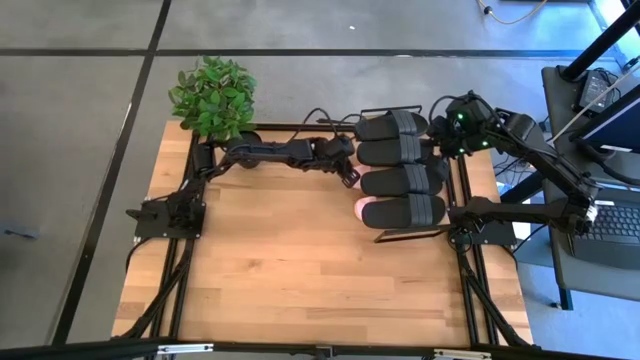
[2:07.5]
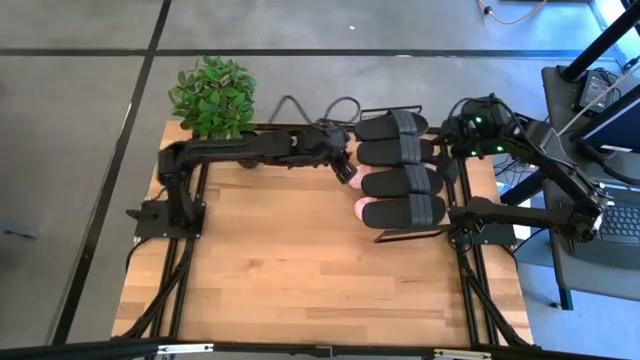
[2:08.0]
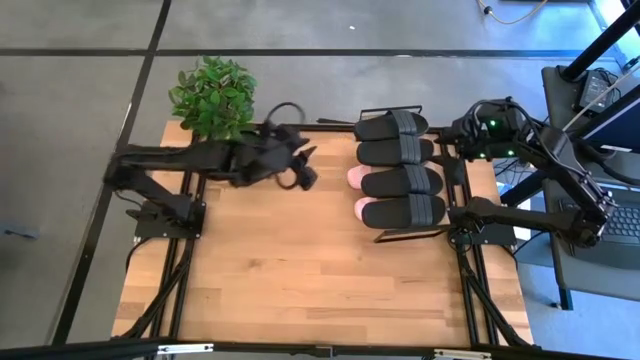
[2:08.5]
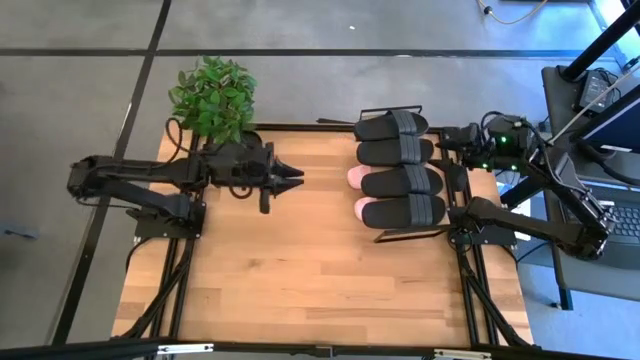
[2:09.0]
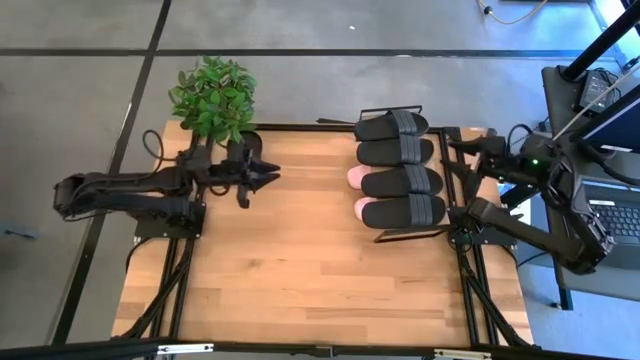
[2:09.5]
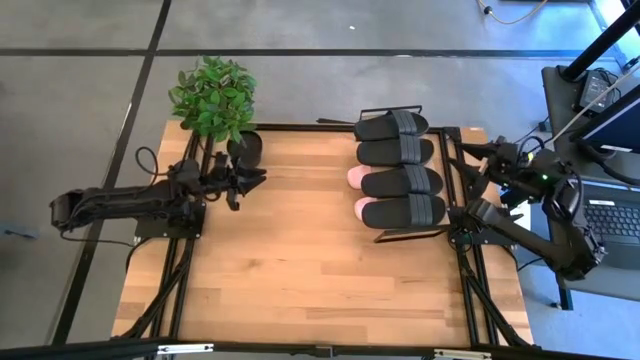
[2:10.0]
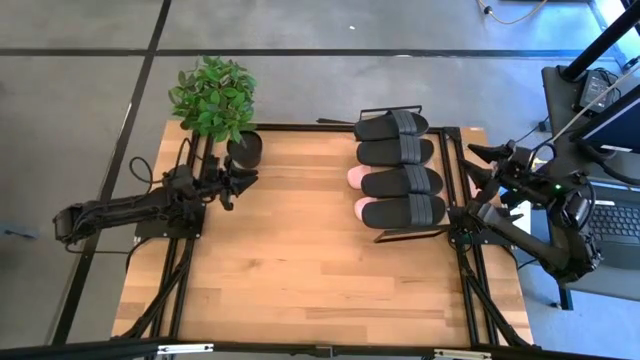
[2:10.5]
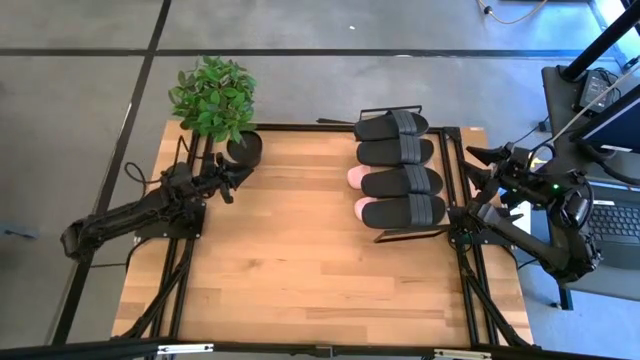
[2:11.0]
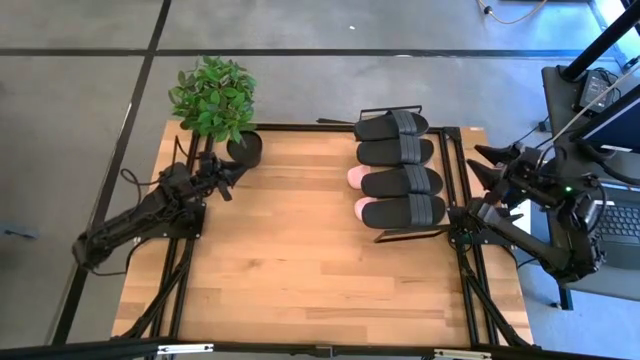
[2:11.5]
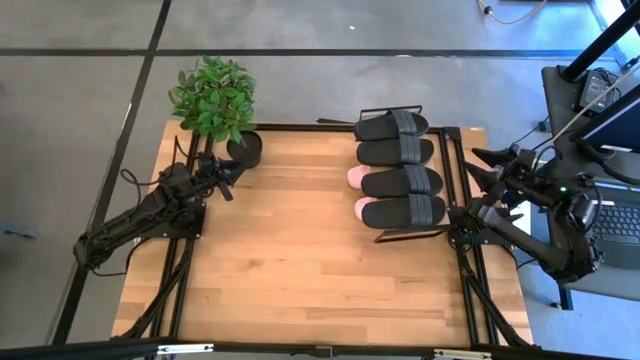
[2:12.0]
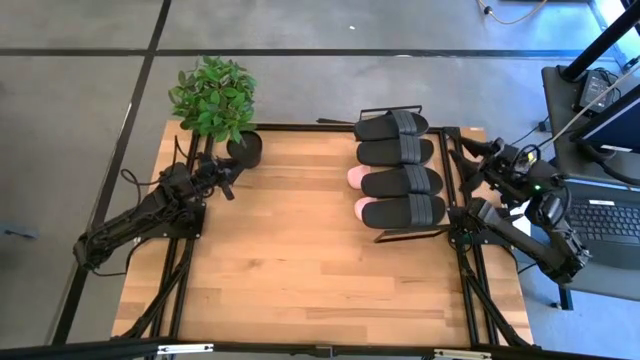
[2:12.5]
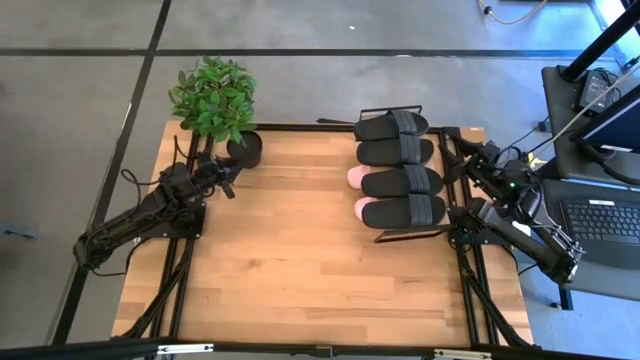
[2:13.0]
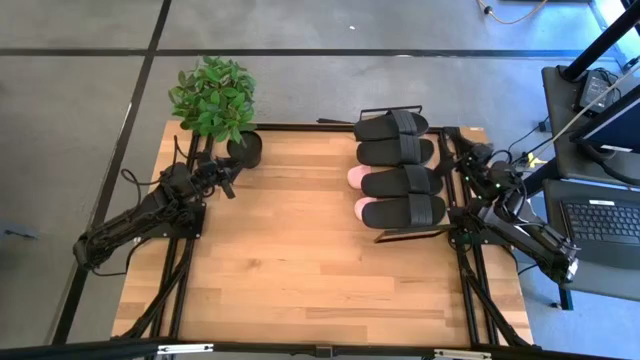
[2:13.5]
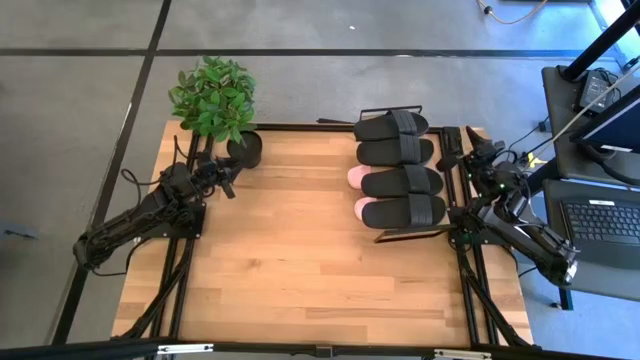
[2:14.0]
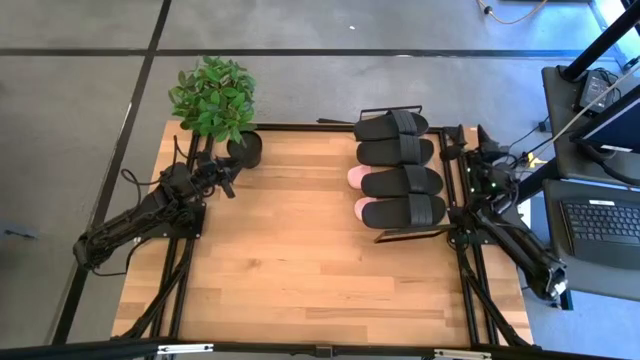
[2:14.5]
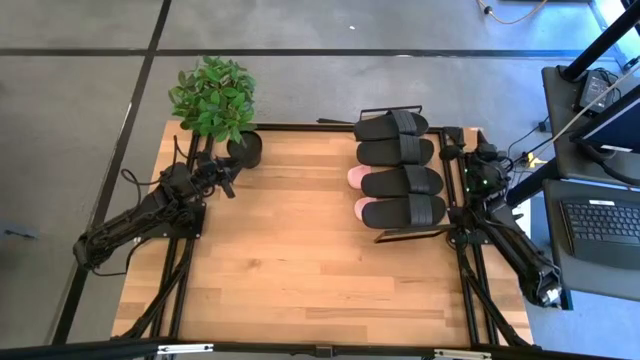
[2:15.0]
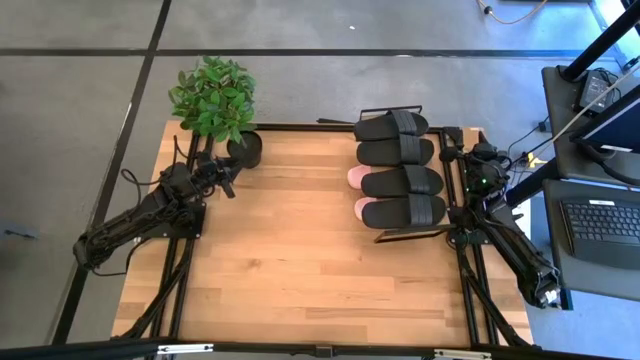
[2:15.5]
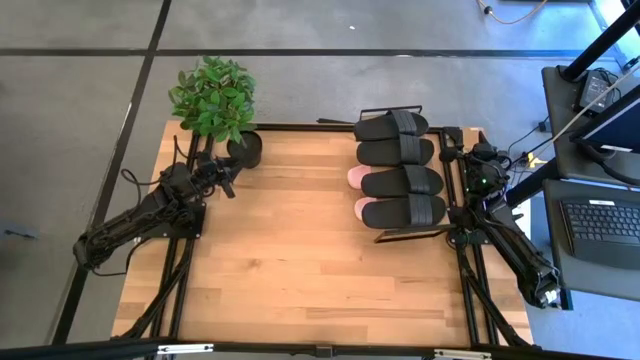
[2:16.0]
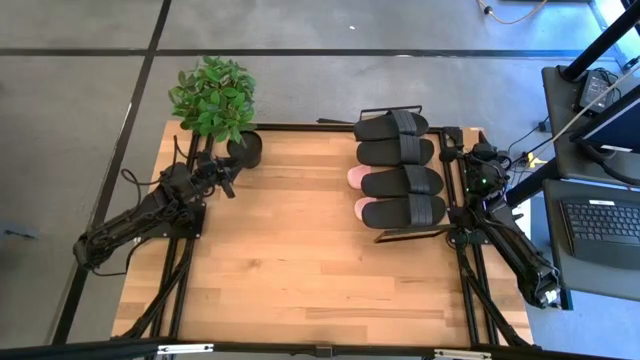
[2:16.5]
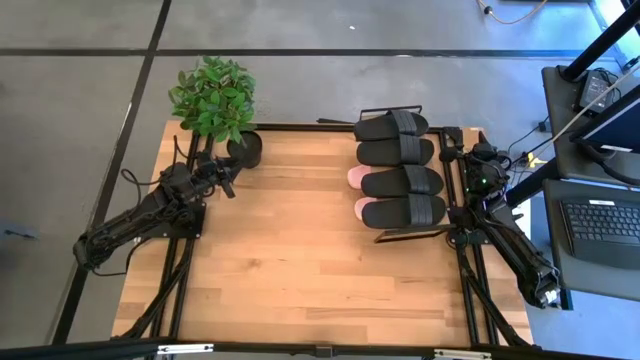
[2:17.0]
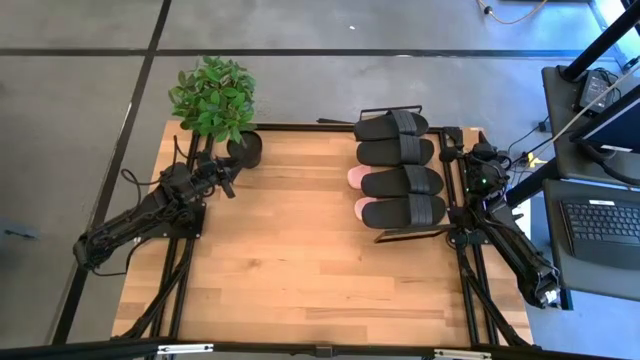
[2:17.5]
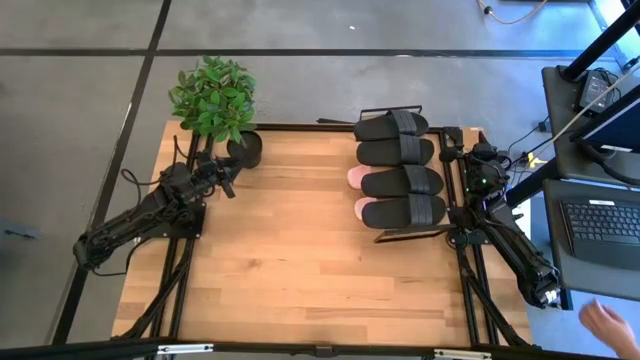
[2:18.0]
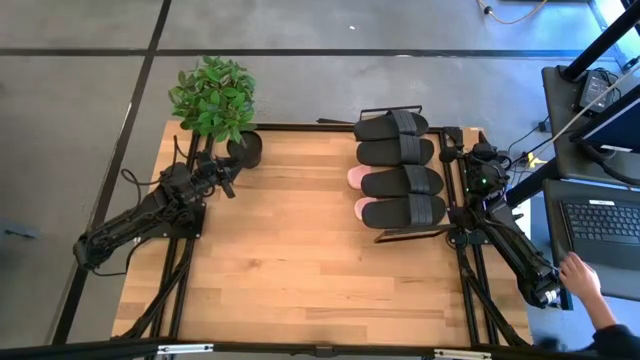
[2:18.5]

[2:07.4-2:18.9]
Task: Pick and place slides into the shelf
Return to Home Position

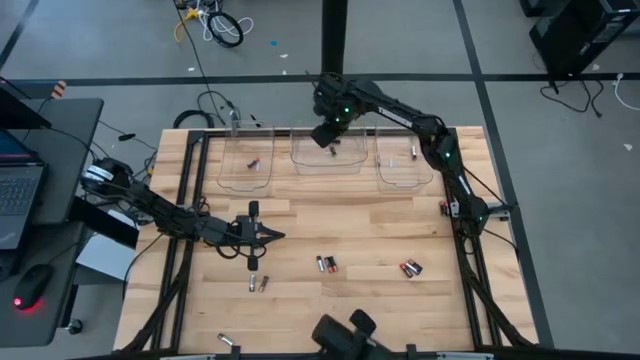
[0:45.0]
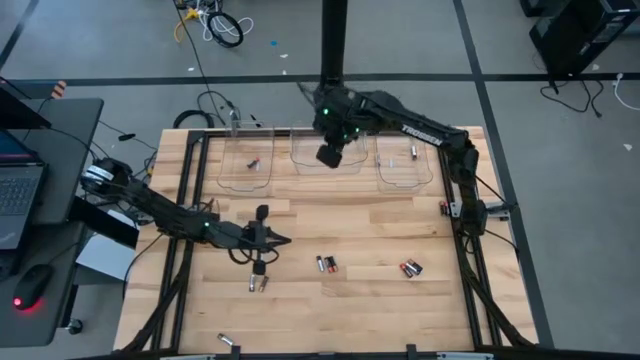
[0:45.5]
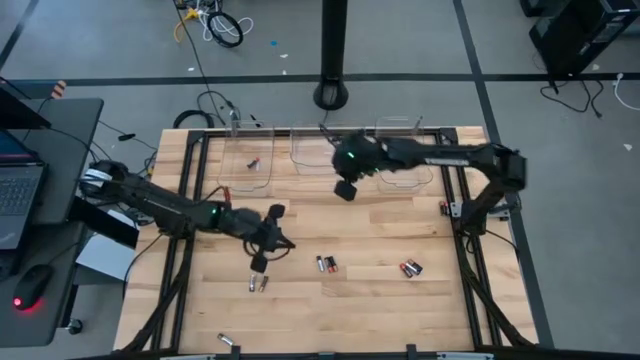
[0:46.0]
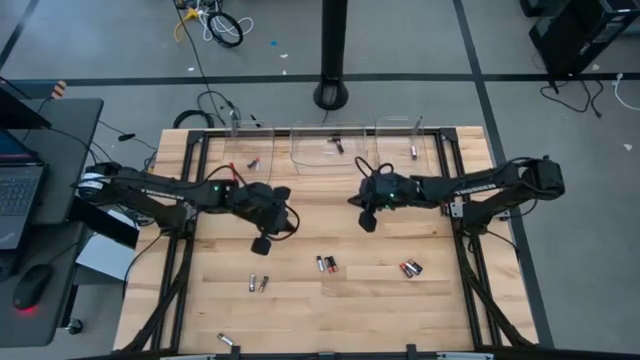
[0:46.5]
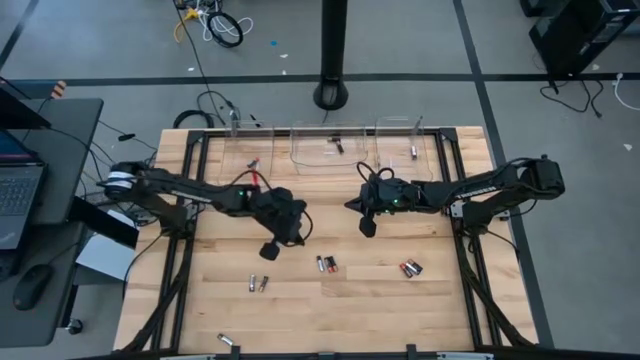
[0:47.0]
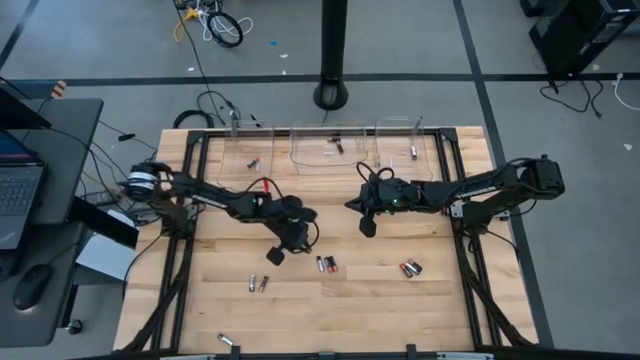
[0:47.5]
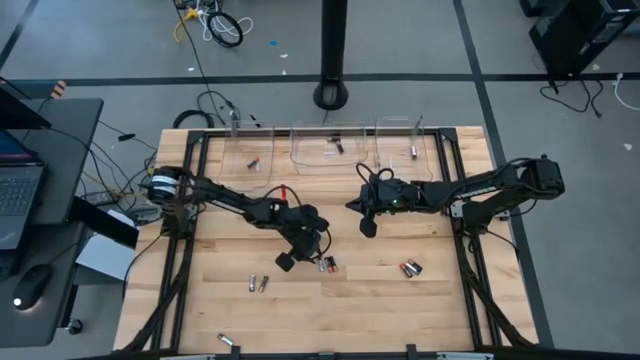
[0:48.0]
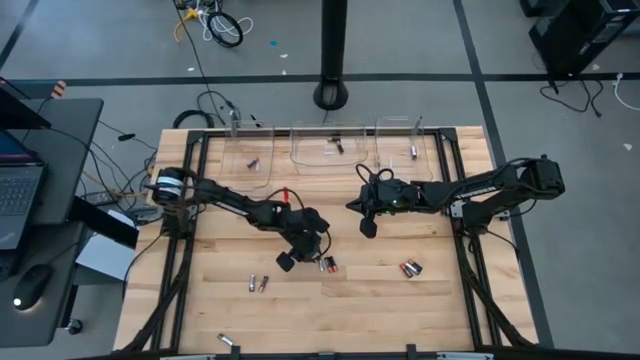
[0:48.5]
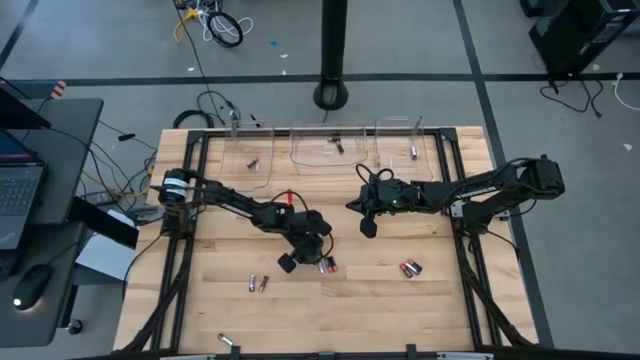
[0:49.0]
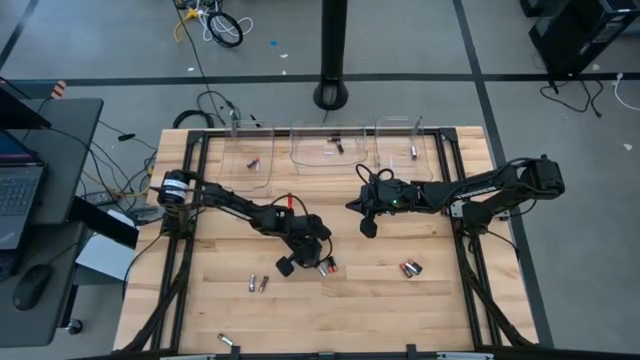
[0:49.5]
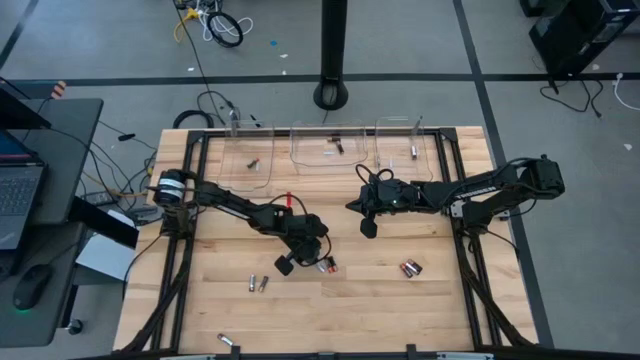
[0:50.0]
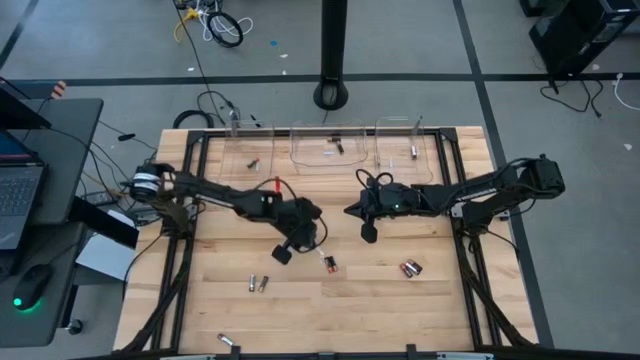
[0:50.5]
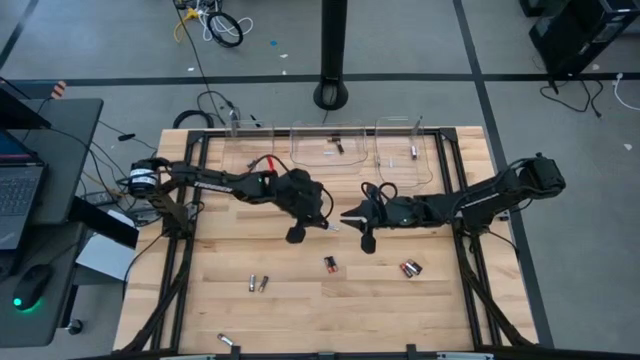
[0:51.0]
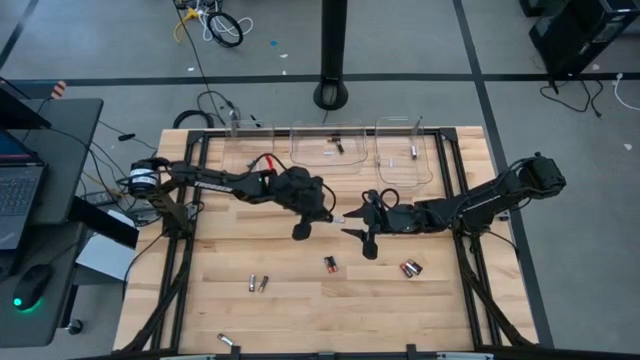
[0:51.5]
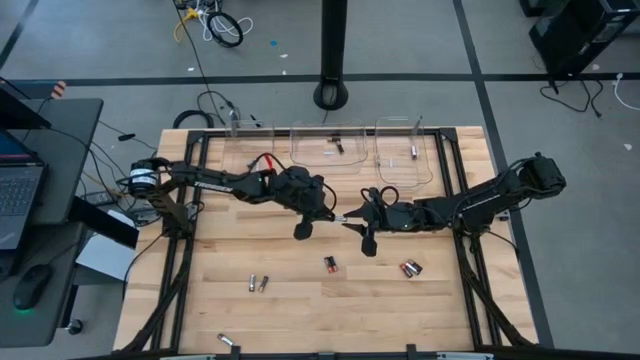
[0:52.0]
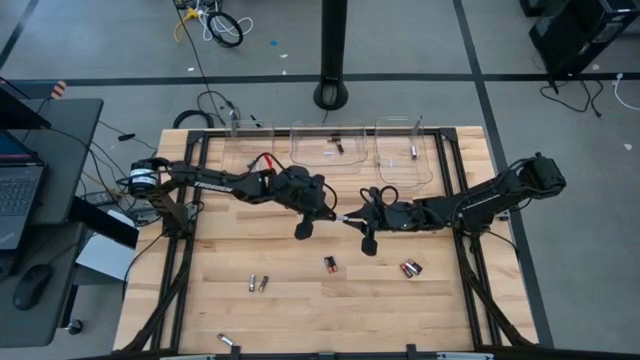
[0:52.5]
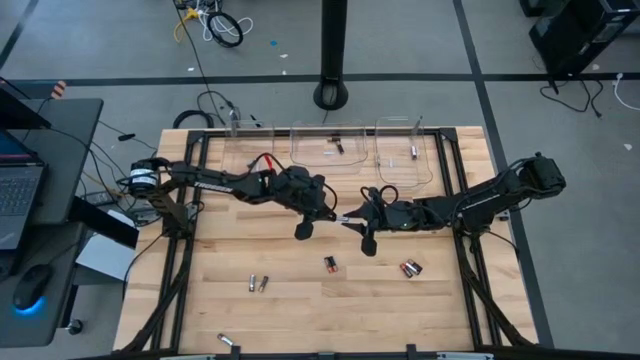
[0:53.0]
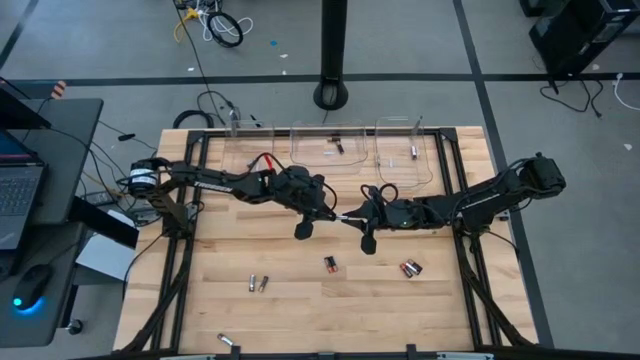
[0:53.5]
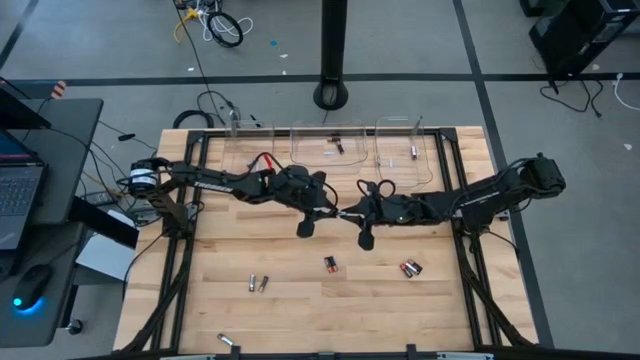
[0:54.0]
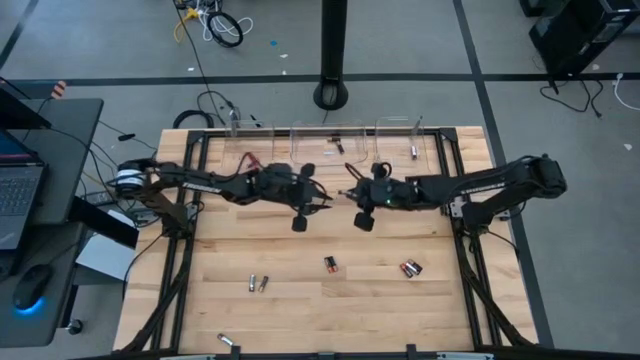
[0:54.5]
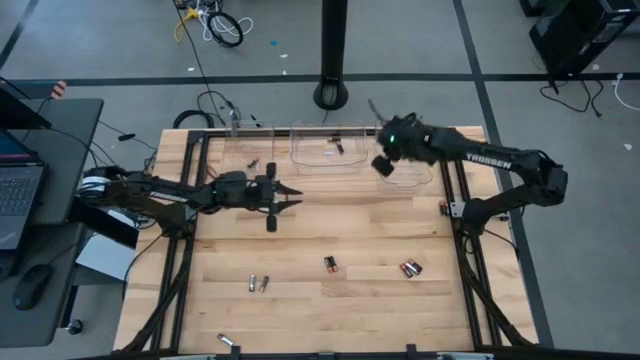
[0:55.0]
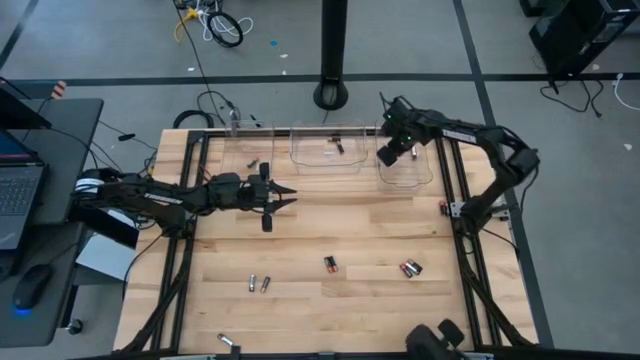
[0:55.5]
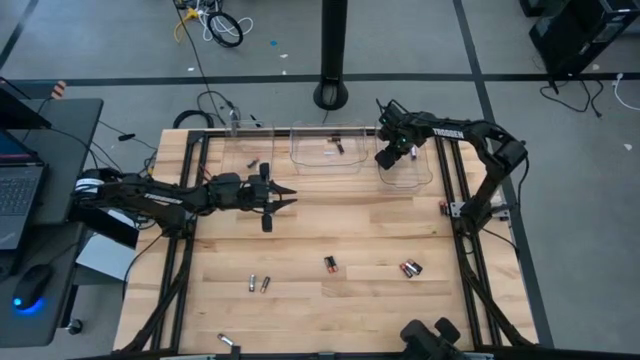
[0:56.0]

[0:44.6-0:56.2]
Task: Sort batteries
Put the silver battery into the right transparent bin
